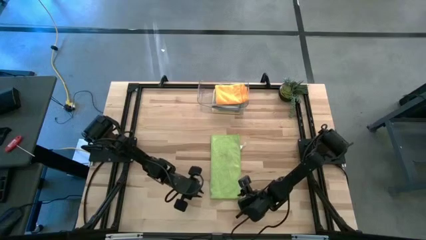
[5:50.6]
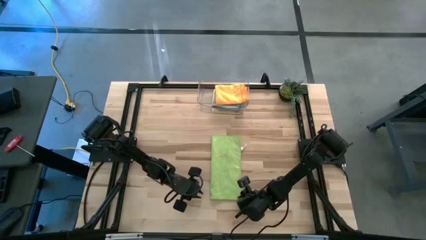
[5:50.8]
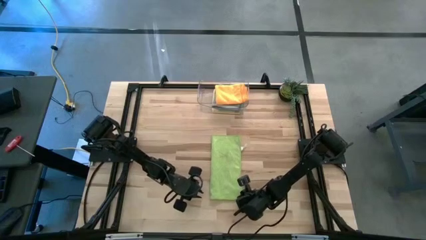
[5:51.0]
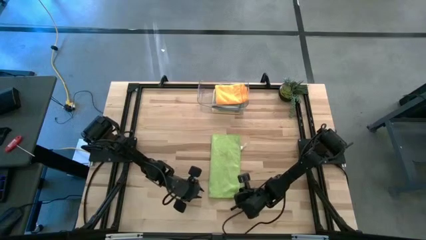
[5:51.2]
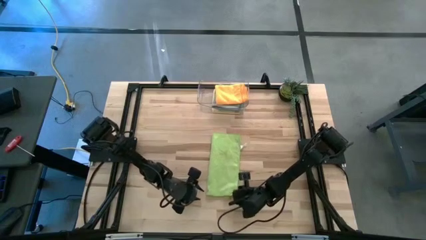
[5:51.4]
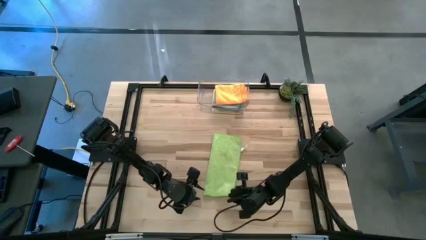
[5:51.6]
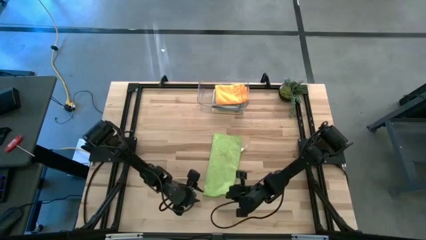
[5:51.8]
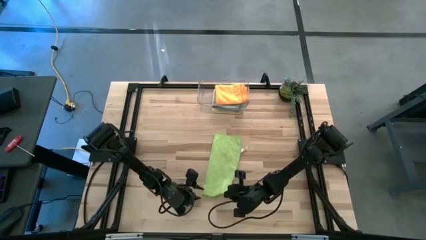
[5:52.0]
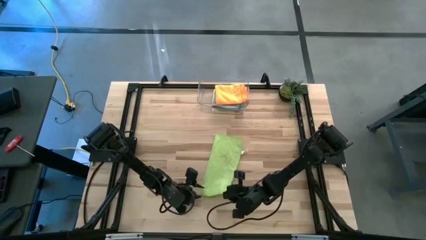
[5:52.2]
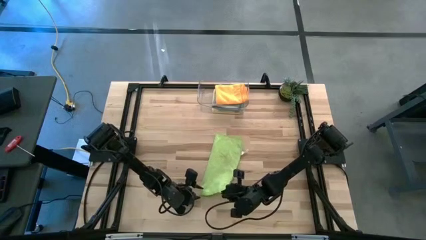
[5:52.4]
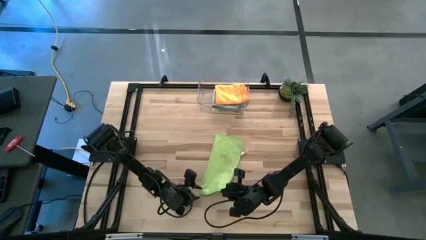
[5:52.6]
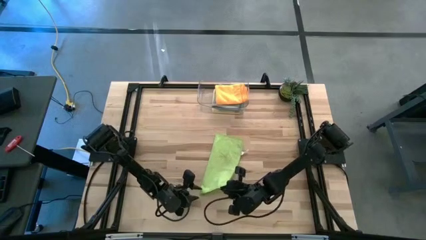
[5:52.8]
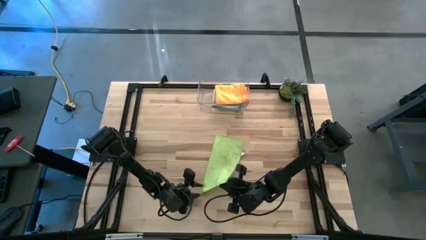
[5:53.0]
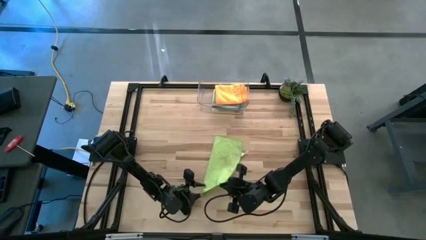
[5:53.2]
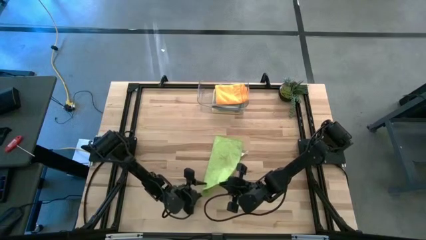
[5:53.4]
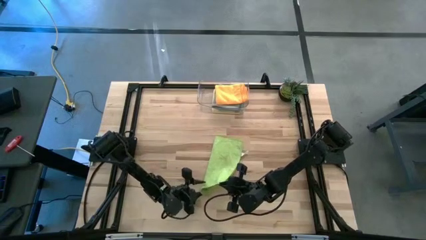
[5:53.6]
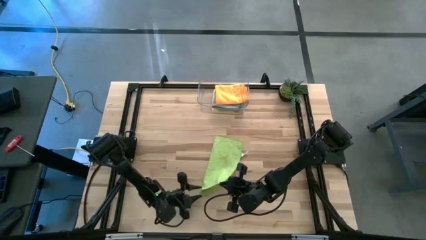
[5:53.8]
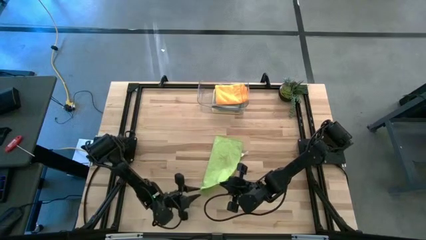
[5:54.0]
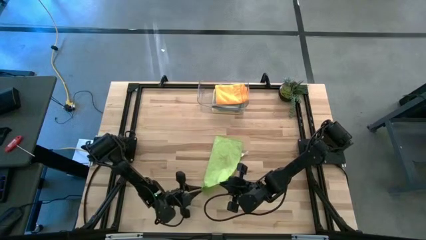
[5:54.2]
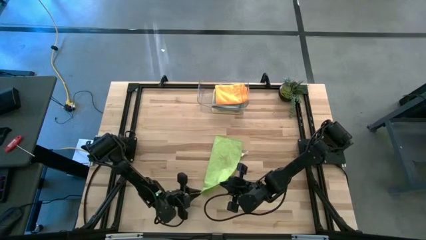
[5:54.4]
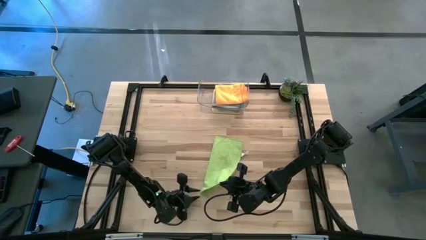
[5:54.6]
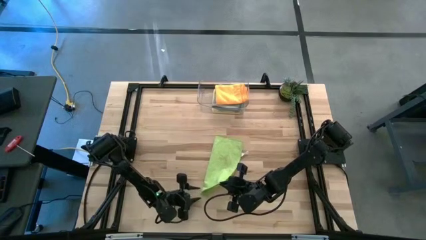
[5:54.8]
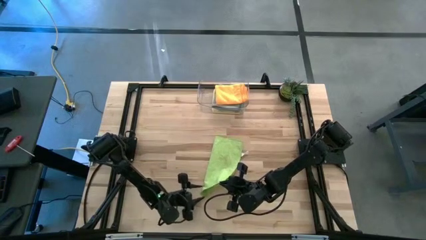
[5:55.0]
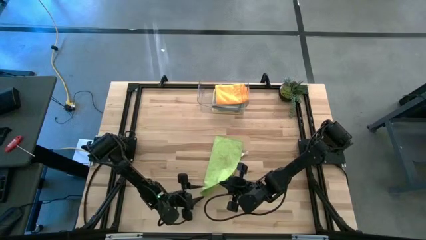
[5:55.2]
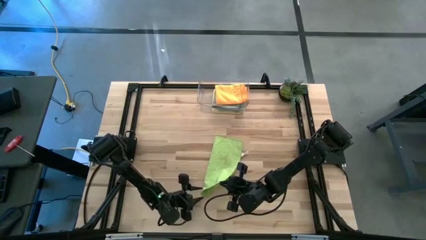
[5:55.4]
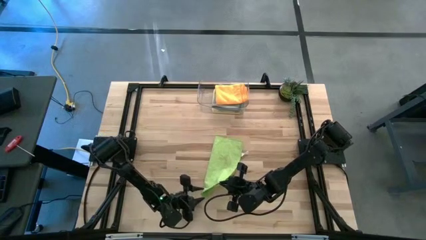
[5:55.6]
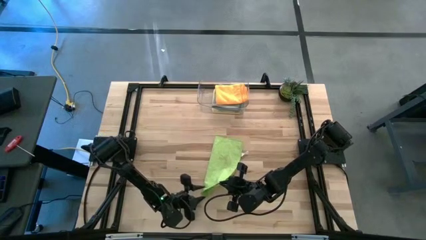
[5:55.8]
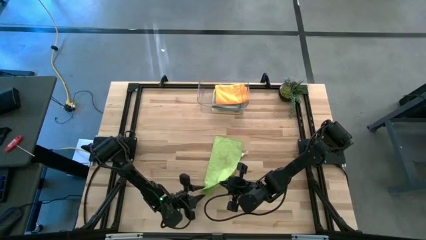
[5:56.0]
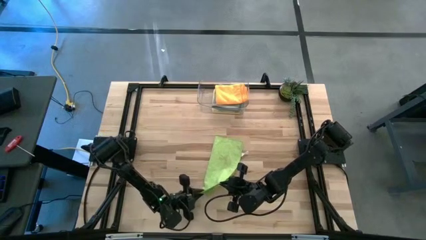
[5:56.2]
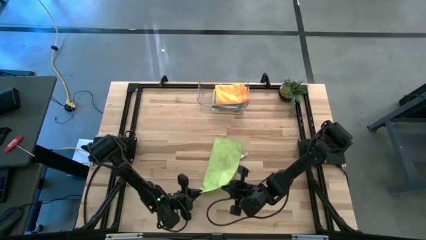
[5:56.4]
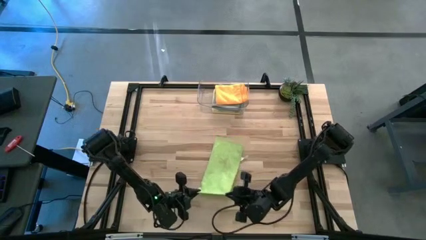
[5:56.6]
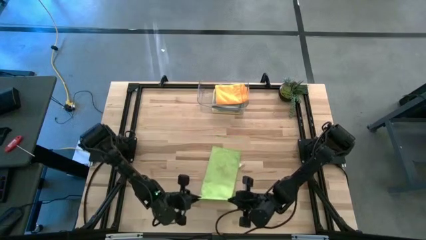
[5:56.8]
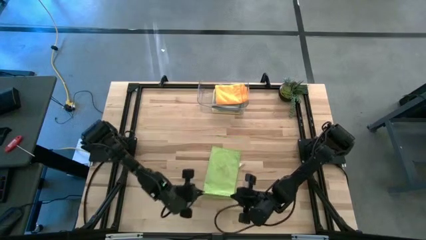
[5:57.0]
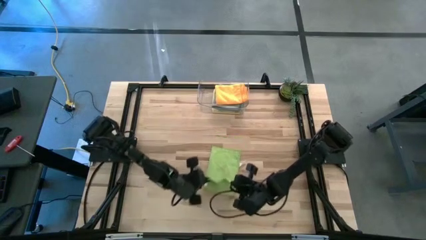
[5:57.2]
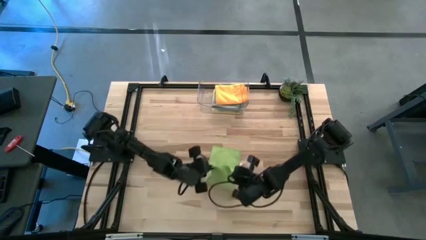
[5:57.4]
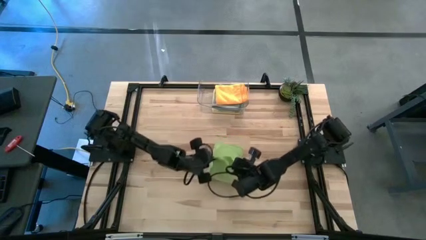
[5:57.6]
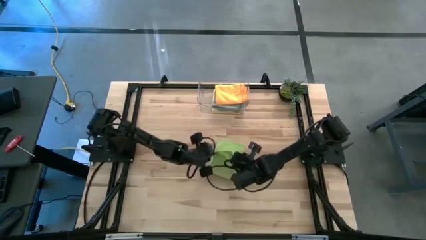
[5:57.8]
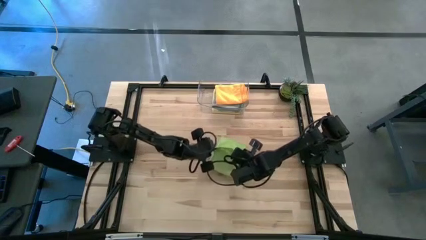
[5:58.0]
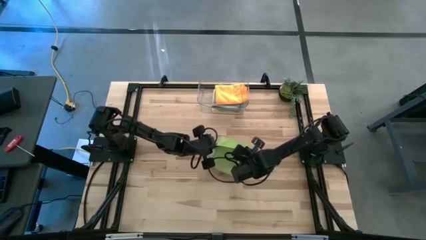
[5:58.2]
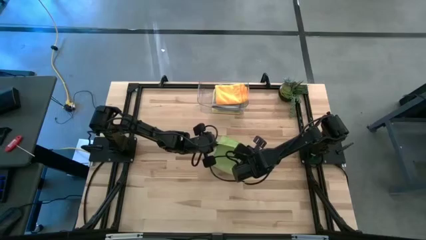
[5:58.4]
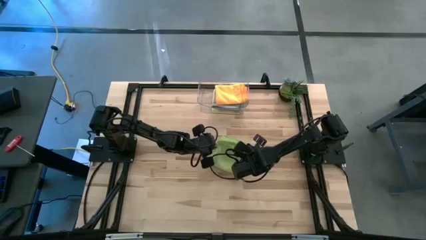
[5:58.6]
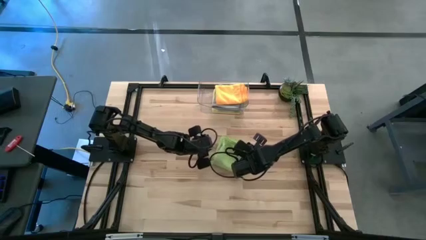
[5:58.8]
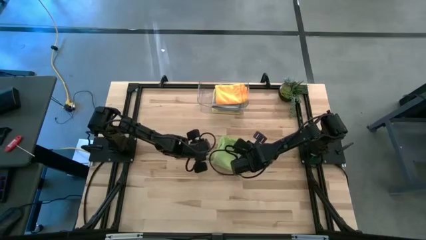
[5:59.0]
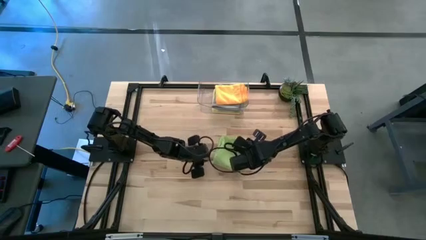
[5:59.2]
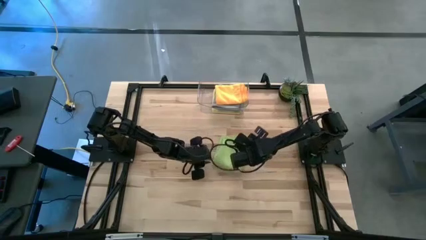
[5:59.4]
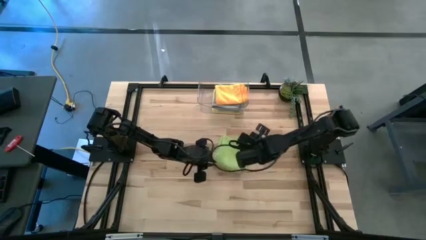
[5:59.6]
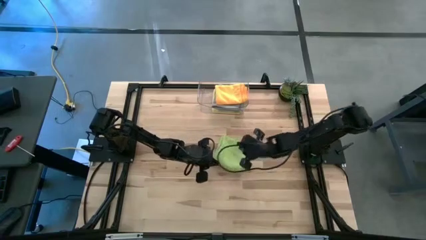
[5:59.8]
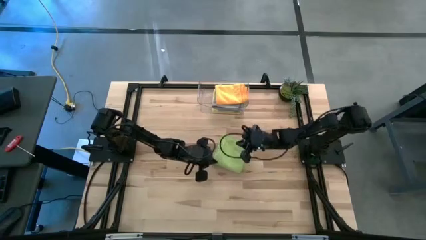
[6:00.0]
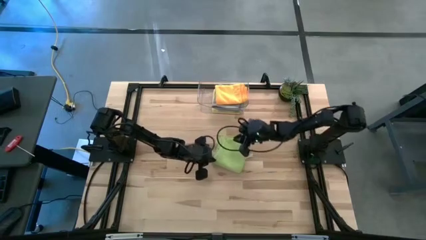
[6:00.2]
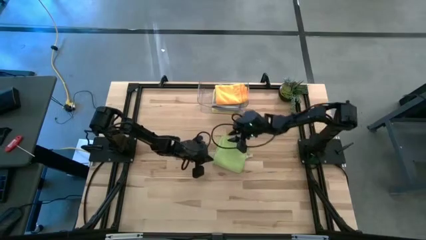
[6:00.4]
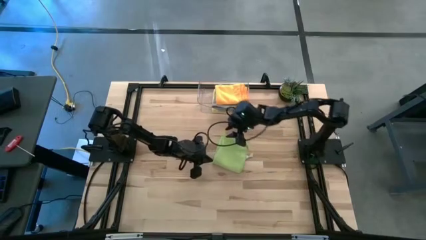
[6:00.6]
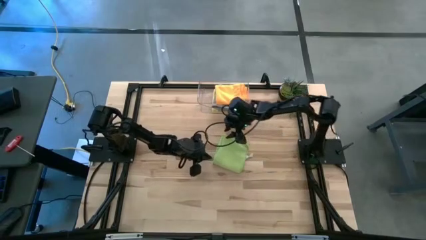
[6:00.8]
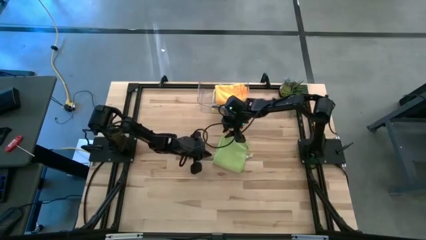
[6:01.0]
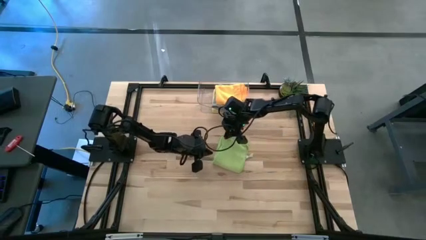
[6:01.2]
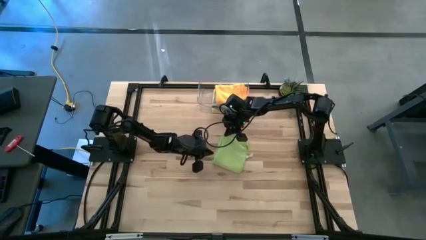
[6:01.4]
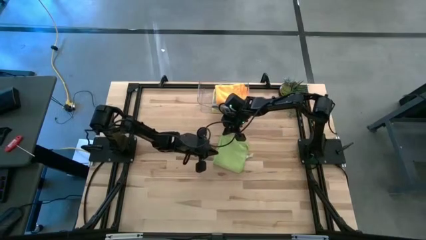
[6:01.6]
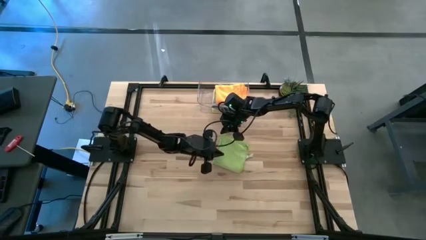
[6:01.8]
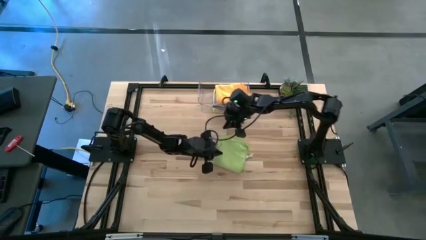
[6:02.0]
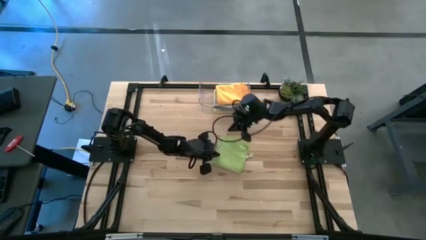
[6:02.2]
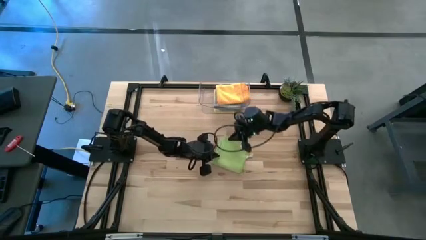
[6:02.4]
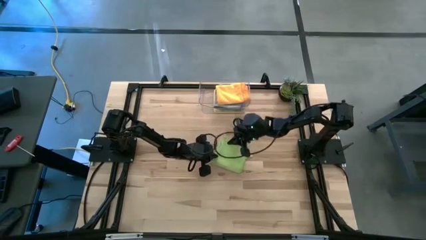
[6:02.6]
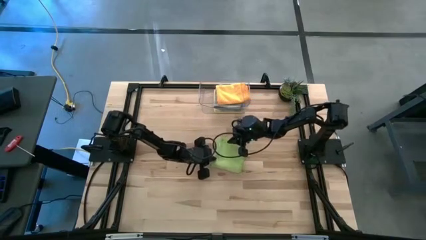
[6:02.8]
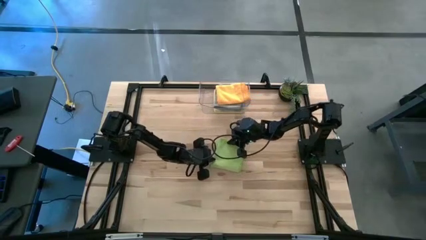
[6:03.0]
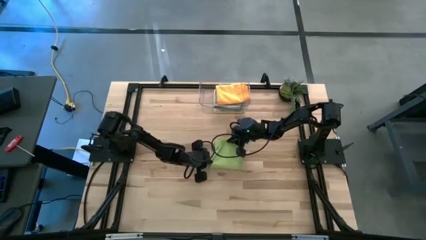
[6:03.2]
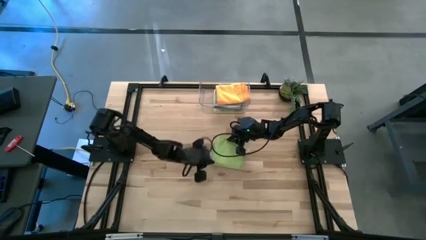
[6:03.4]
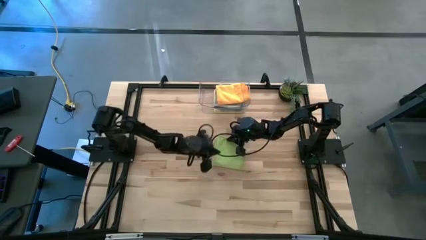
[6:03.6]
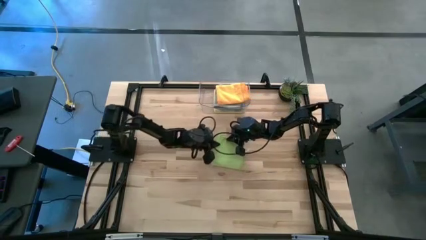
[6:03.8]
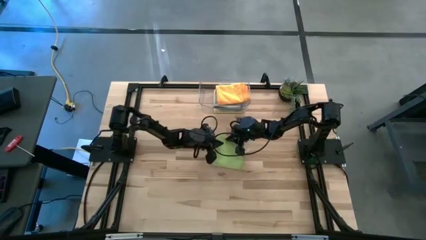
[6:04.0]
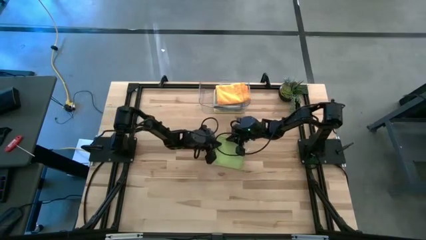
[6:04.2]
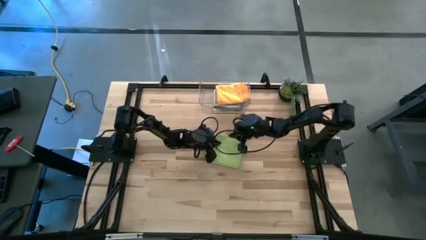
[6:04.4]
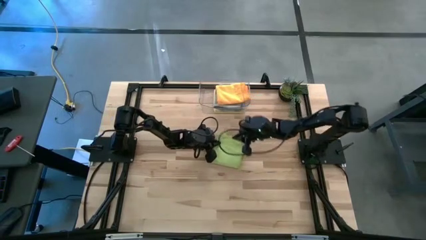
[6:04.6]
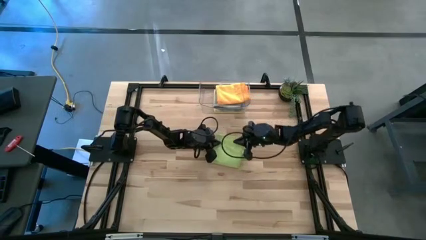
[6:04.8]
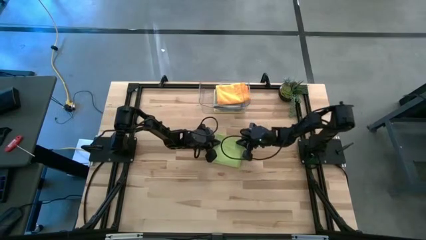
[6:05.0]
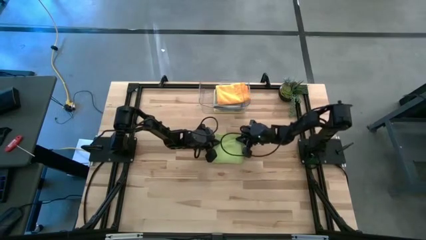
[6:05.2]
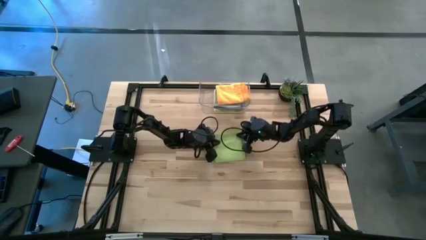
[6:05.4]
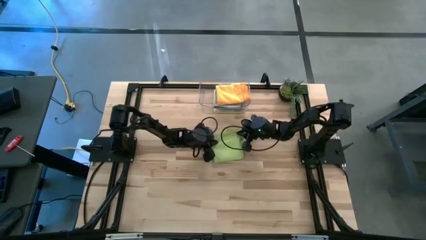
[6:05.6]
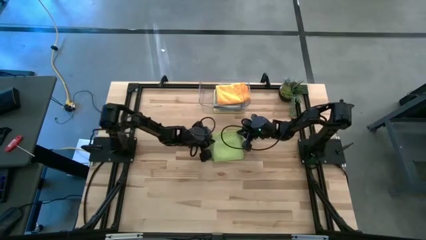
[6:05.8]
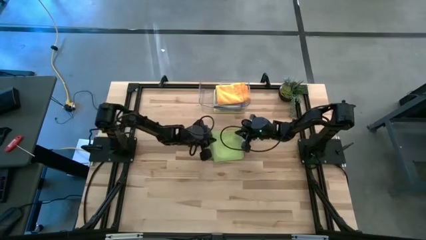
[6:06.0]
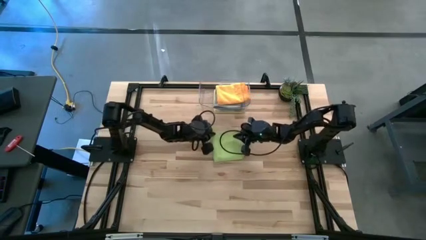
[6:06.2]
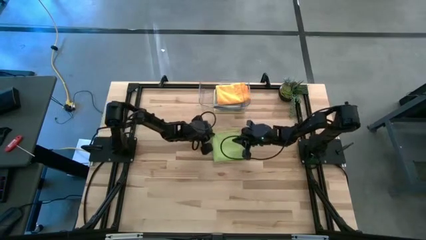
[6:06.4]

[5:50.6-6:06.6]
Task: Fold microfiber towels
Fold the green towel on the table
